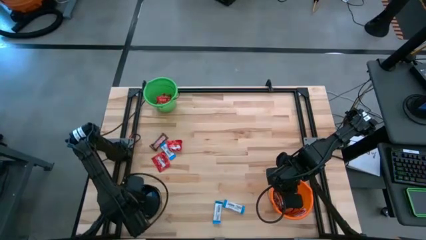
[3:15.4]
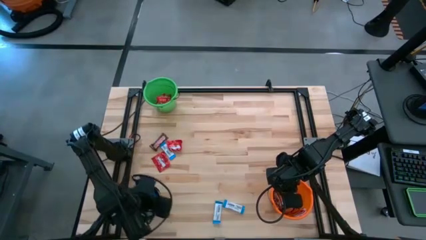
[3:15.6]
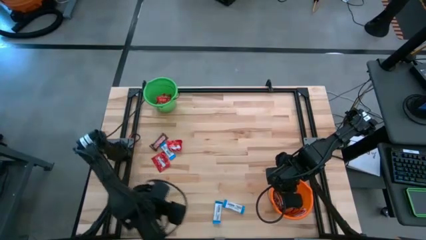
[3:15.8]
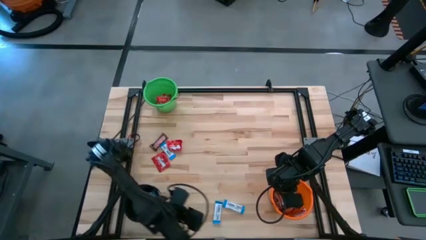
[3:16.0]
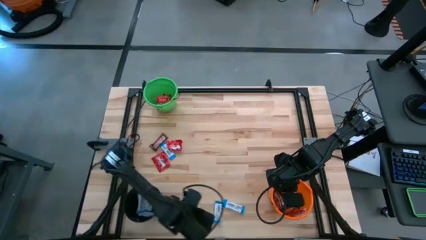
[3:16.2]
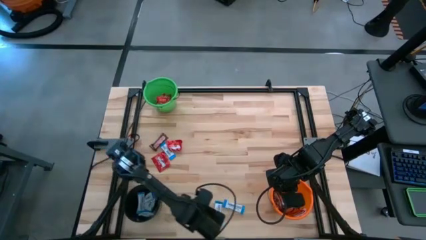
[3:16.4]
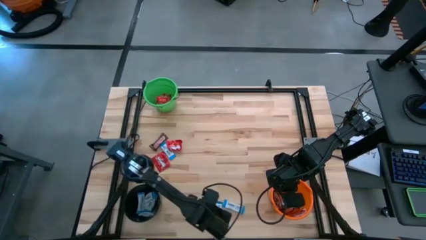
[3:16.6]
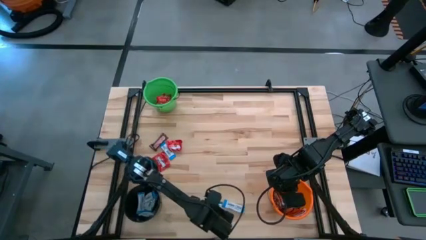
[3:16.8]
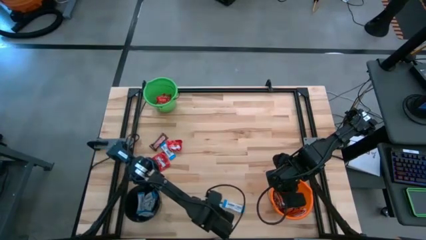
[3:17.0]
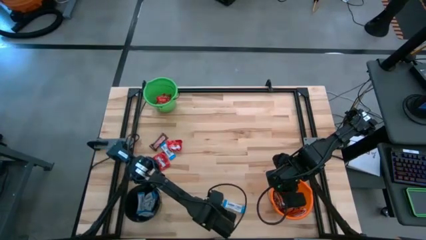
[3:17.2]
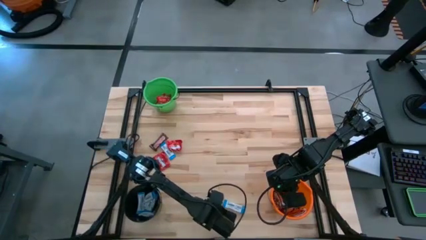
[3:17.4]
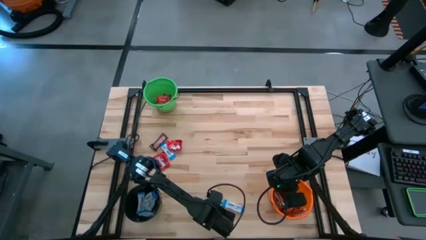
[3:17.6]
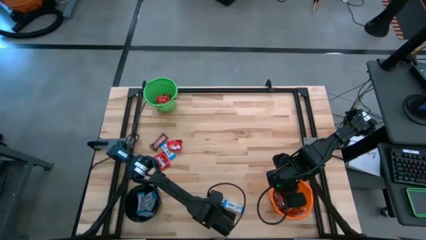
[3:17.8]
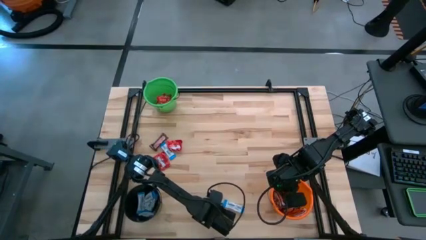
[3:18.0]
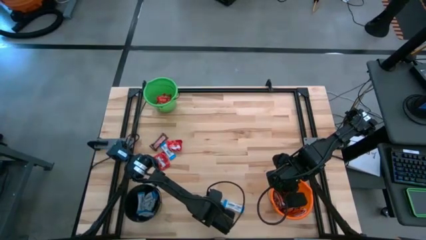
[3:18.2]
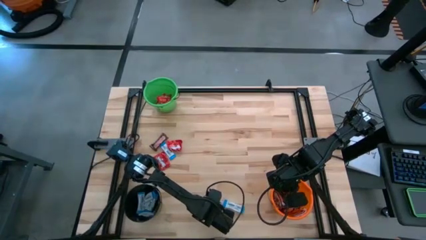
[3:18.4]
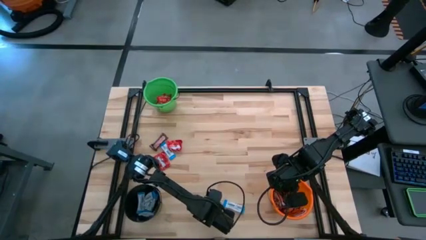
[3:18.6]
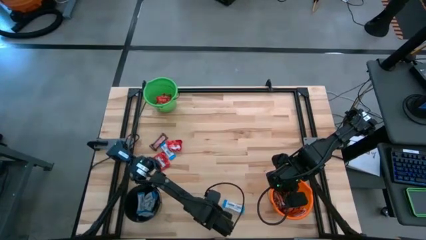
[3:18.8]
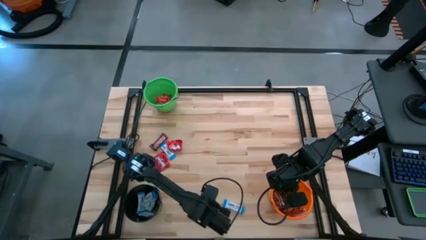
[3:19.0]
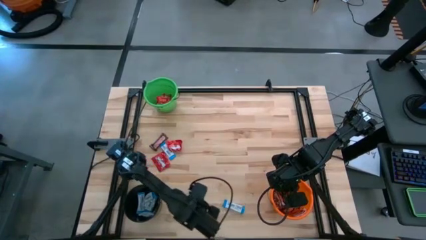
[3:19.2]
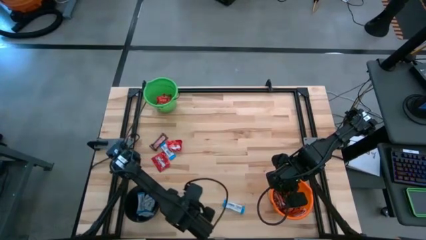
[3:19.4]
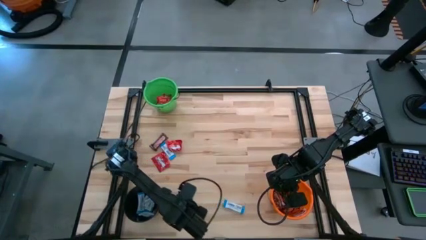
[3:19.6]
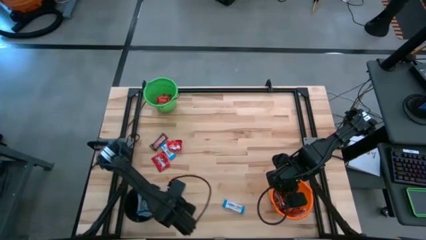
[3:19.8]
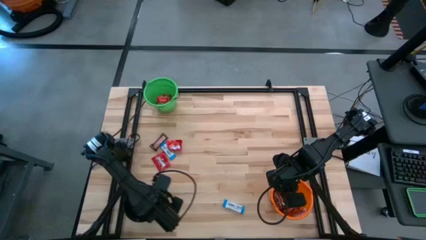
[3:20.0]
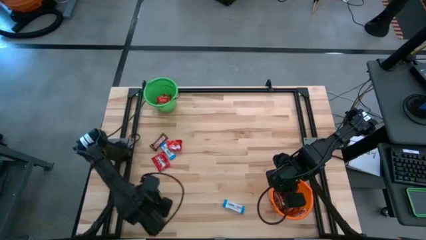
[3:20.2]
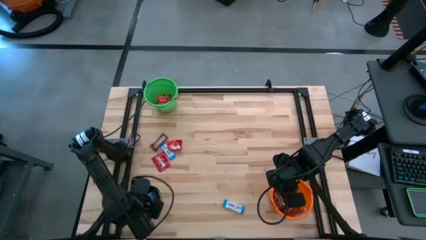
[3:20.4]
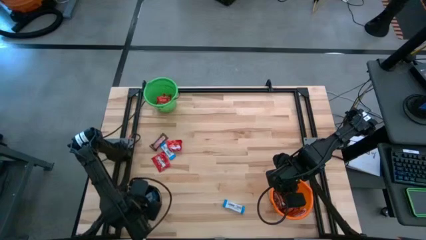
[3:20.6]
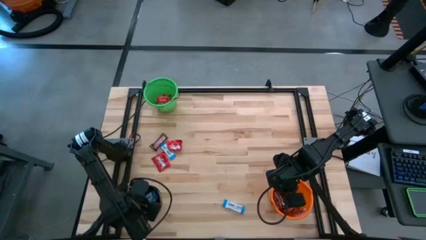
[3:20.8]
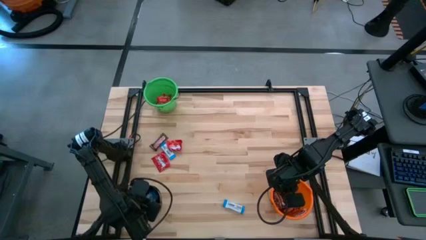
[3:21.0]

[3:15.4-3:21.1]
Task: Sort candy
Put the white chocolate into the black bucket

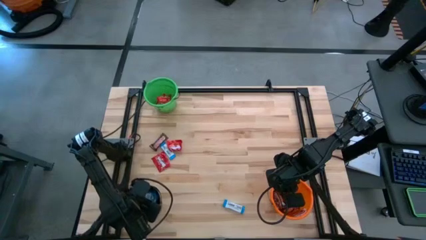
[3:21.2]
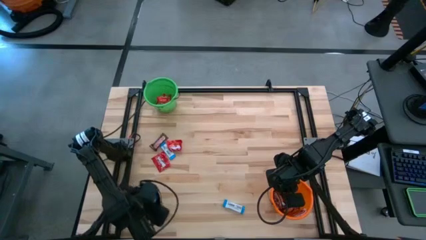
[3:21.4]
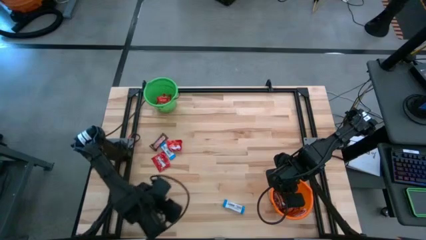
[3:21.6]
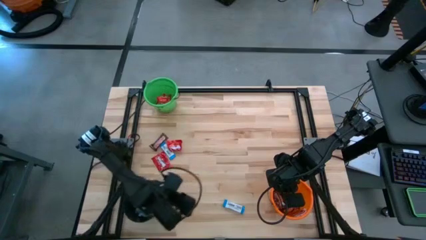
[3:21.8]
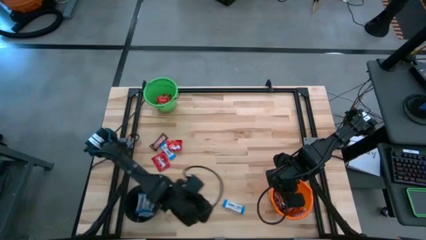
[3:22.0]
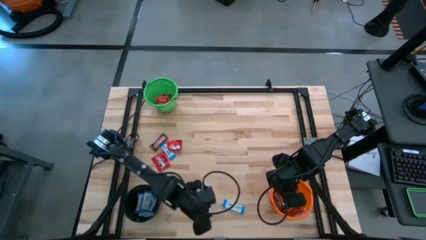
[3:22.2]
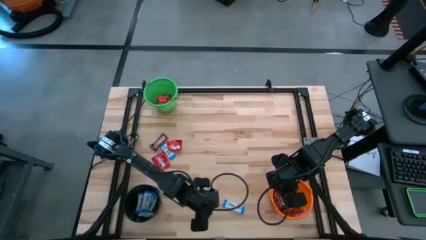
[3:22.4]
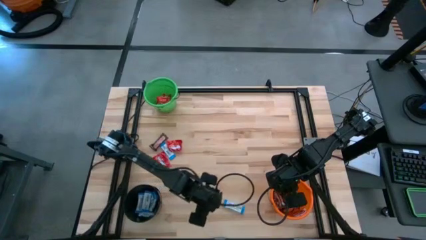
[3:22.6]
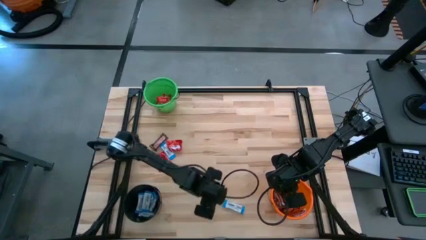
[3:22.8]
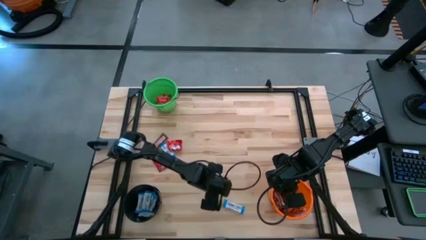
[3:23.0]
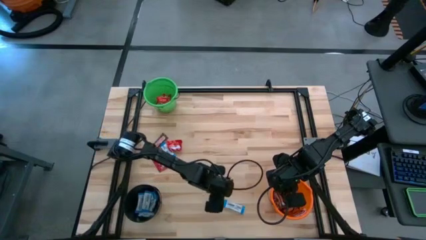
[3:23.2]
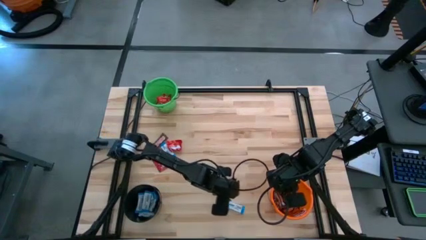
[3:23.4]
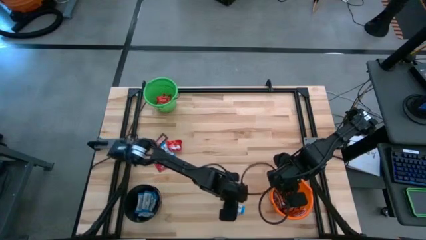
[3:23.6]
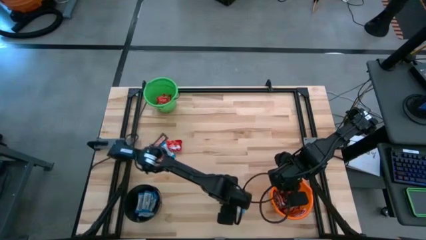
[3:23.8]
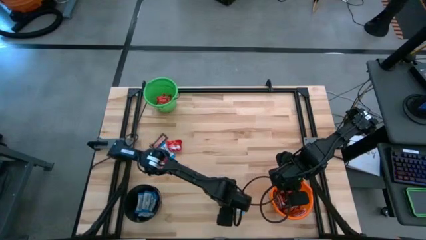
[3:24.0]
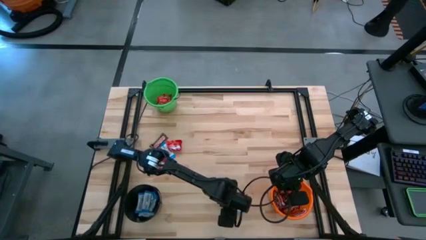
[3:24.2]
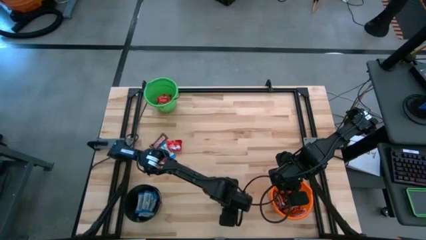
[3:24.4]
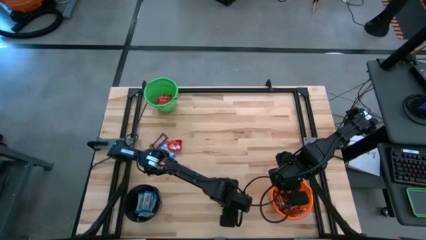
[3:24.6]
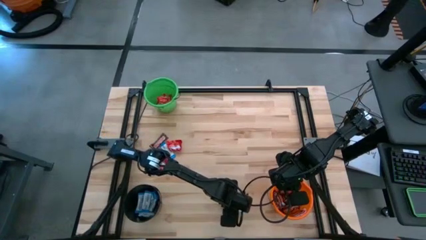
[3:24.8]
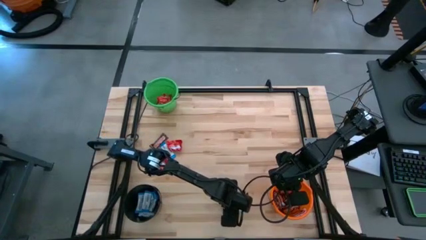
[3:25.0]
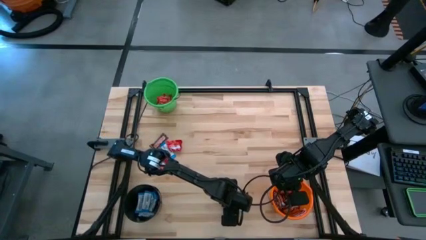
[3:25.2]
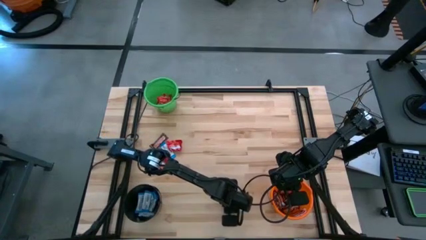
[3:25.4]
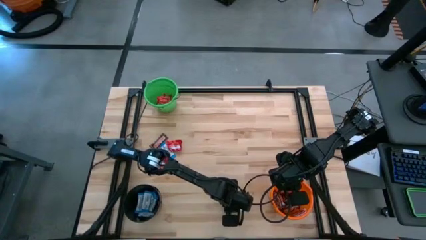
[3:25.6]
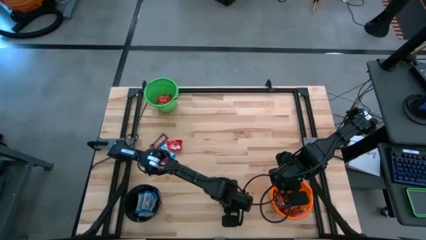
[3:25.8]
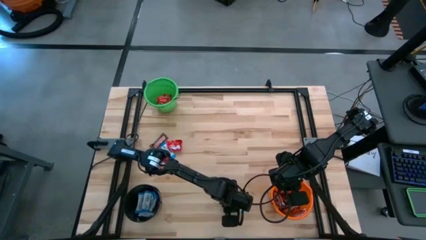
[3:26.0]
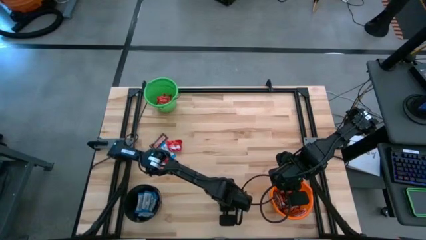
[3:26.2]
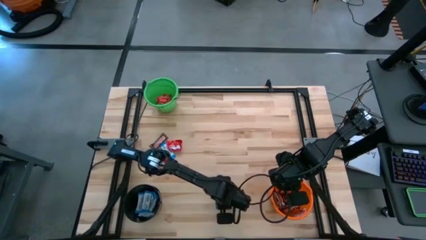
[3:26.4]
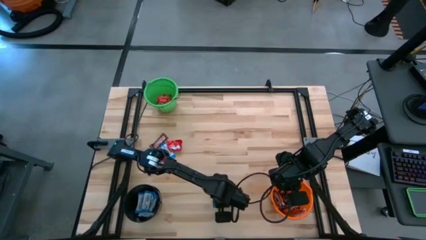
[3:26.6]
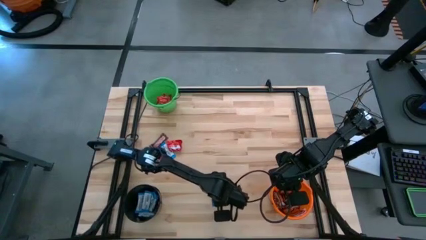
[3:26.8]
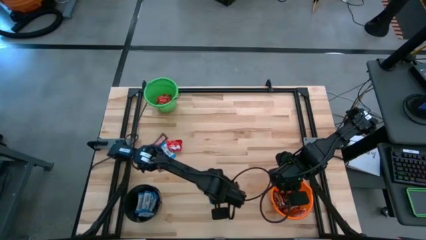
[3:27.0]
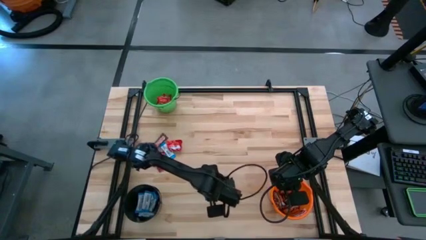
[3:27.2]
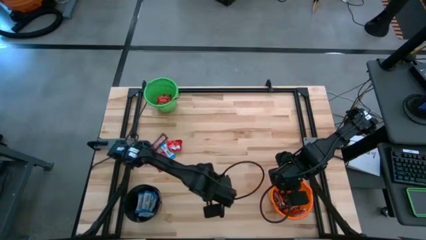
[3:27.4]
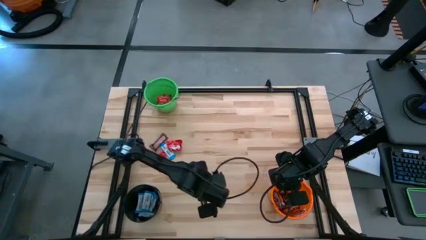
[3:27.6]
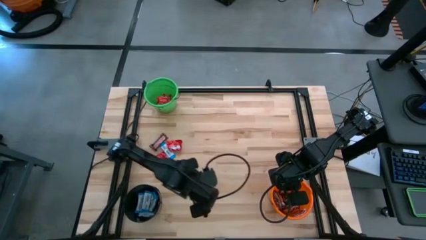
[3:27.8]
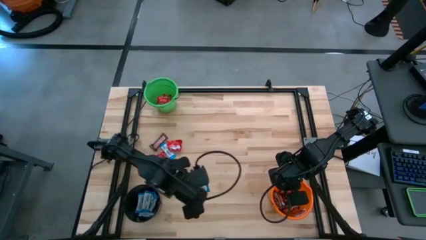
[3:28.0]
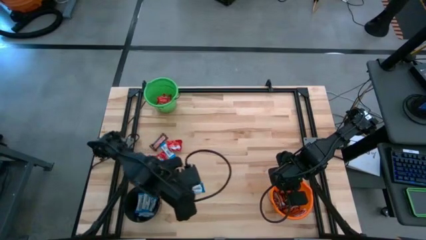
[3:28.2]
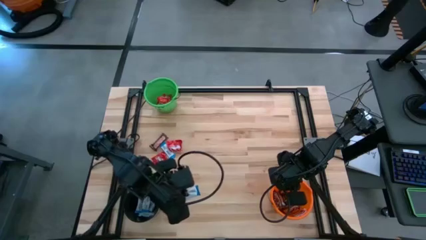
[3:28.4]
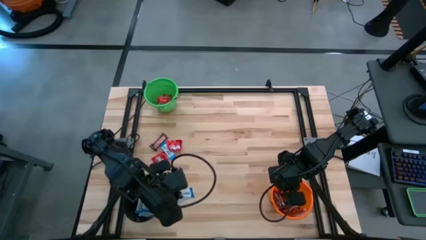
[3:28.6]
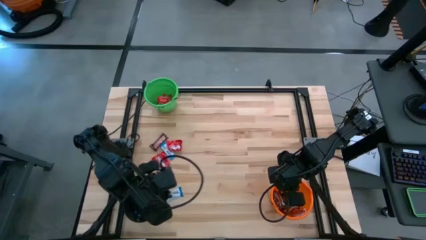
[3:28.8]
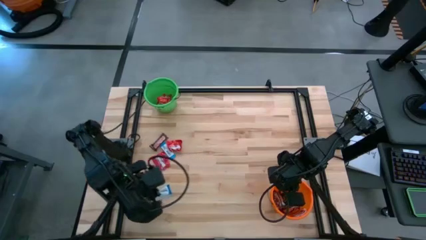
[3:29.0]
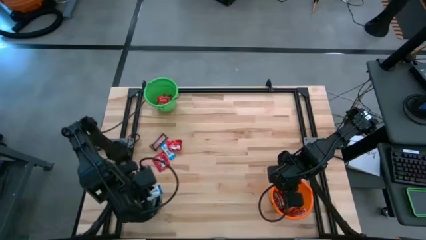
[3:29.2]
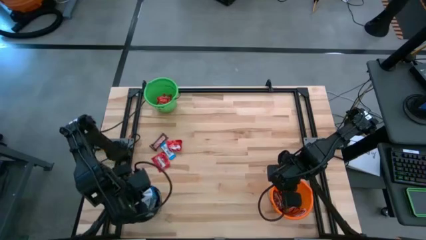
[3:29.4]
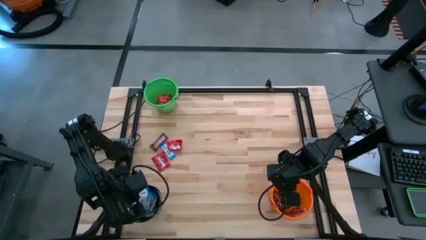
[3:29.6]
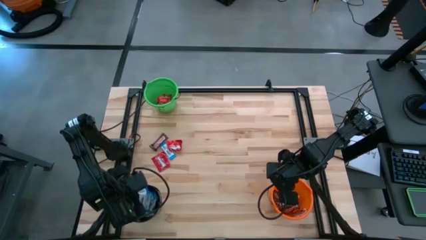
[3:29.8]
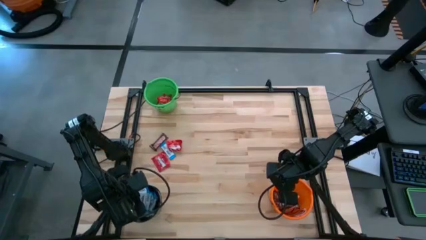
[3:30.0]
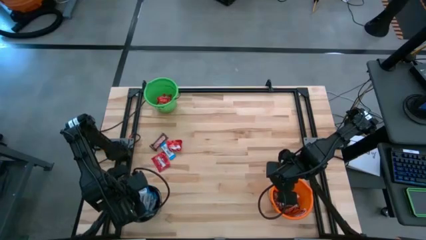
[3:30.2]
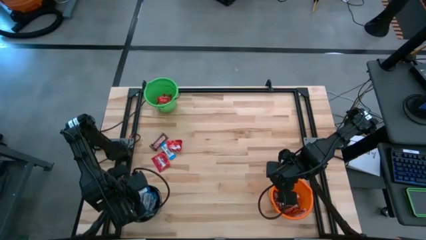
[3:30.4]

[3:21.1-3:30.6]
Put the white chocolate into the black bucket

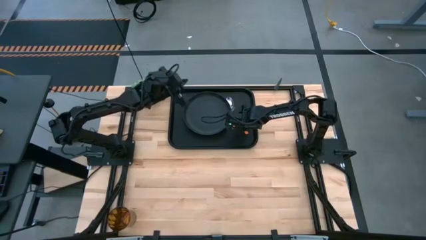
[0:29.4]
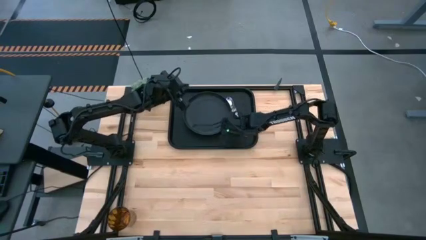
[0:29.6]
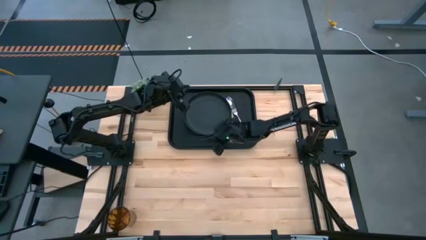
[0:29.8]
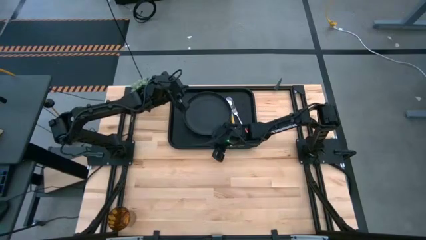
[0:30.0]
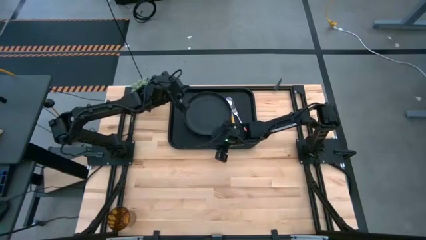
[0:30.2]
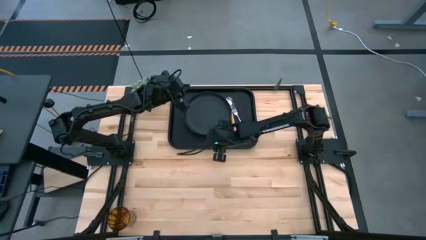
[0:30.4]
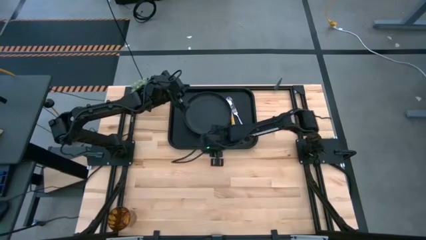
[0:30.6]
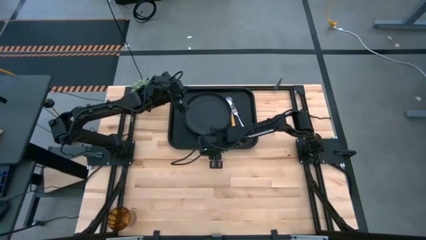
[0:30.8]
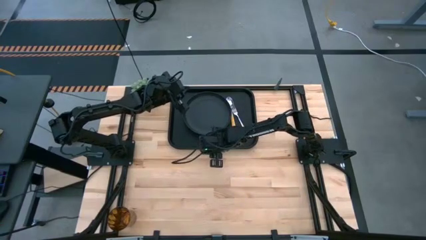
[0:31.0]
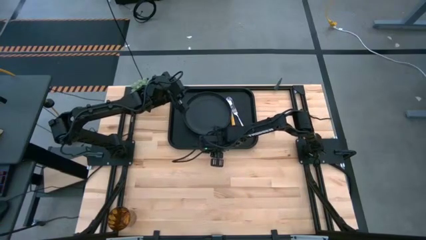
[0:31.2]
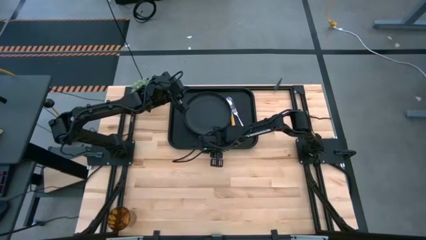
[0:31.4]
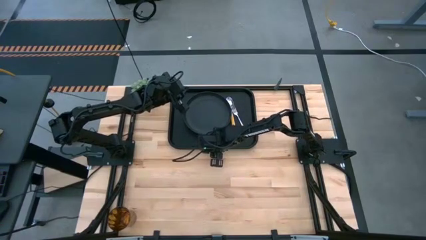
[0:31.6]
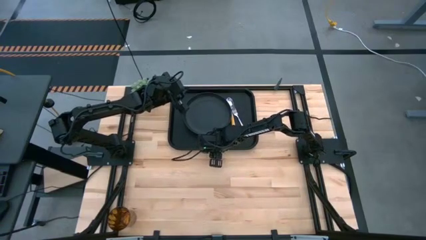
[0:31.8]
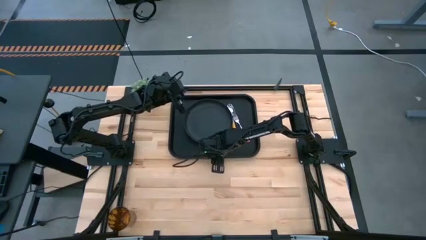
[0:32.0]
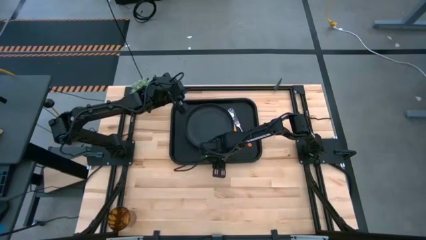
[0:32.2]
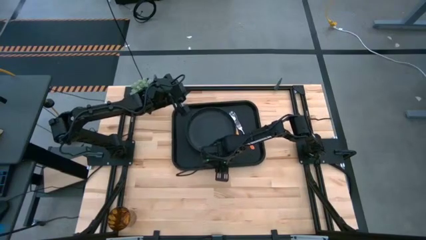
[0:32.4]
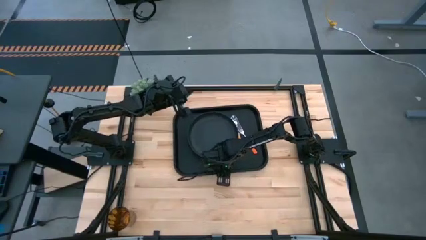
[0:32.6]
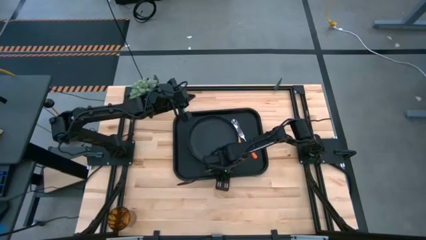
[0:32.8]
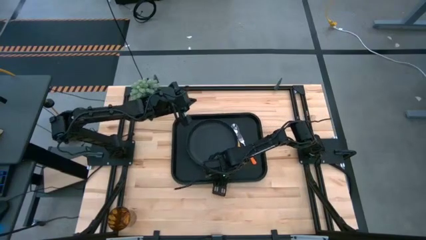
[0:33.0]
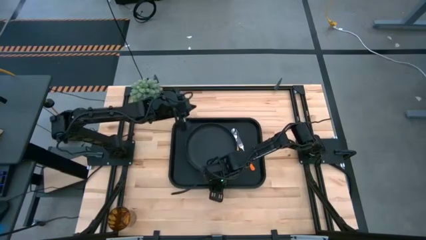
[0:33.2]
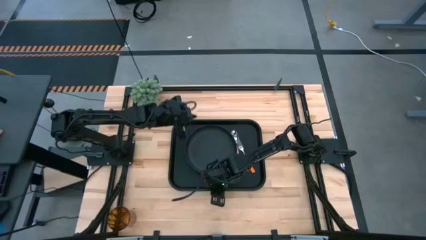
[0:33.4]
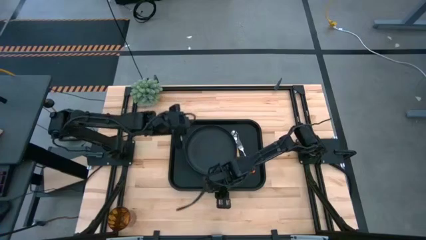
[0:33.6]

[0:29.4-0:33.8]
Task: Pick and place plate/cup/fork/spoon on tray
Adjust the black serving tray
